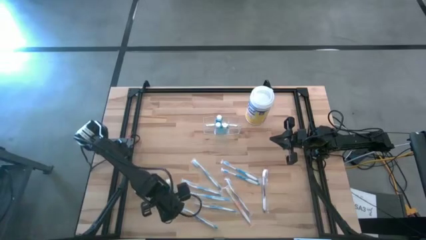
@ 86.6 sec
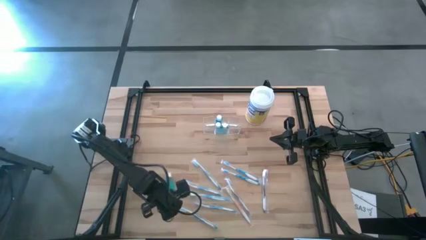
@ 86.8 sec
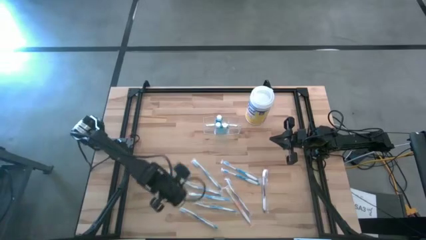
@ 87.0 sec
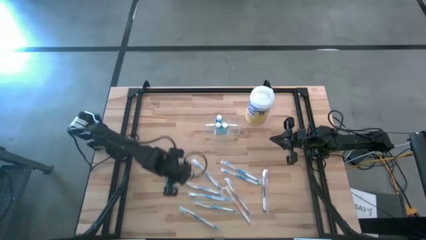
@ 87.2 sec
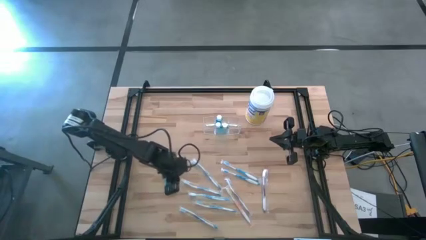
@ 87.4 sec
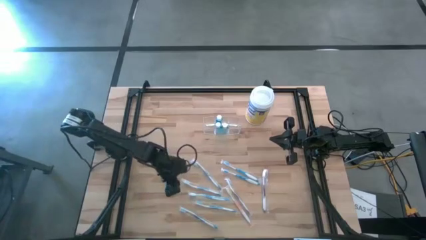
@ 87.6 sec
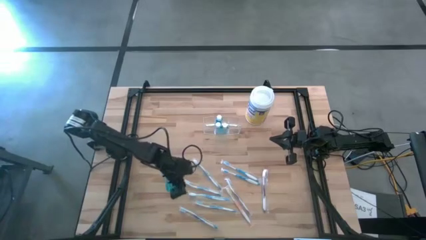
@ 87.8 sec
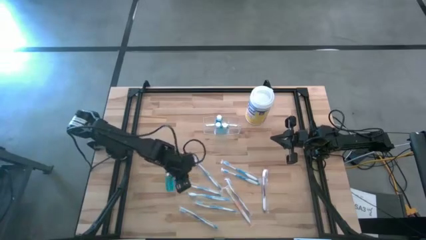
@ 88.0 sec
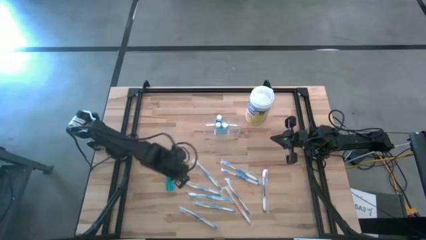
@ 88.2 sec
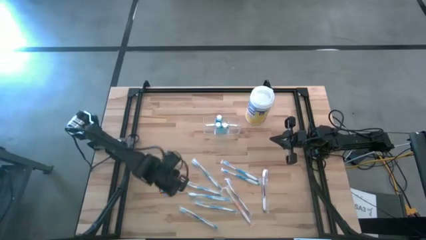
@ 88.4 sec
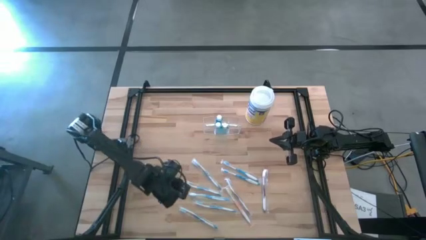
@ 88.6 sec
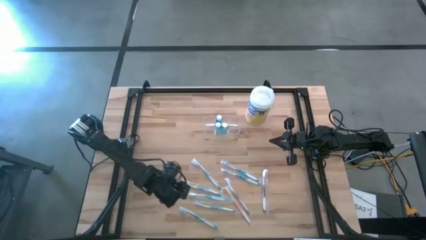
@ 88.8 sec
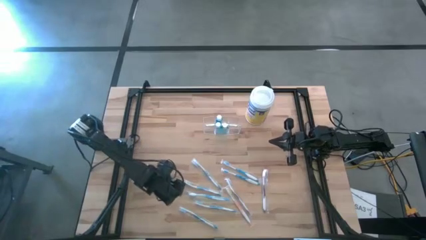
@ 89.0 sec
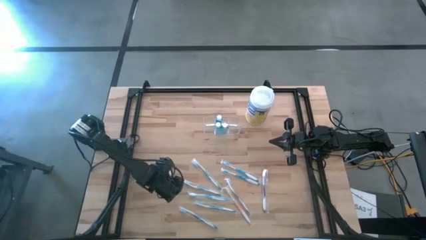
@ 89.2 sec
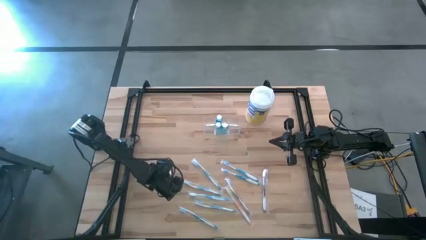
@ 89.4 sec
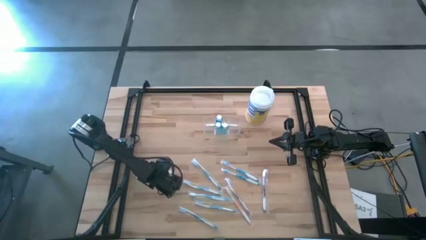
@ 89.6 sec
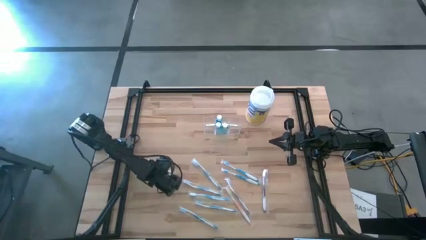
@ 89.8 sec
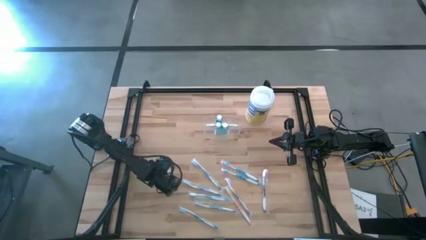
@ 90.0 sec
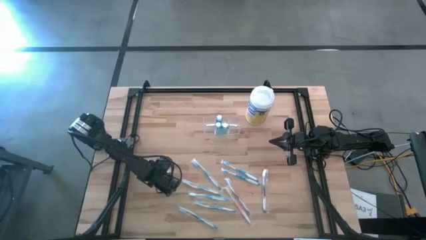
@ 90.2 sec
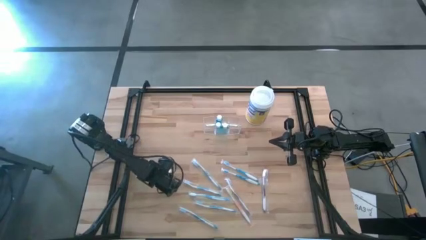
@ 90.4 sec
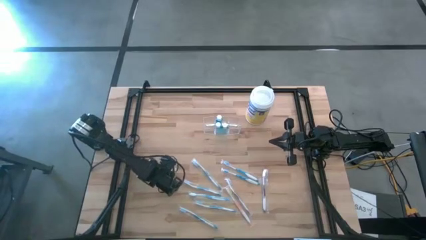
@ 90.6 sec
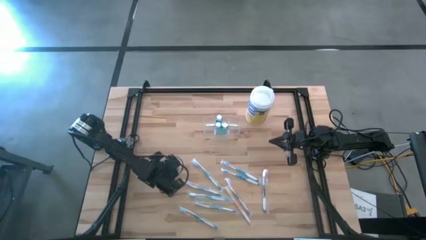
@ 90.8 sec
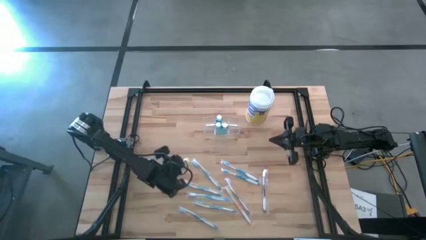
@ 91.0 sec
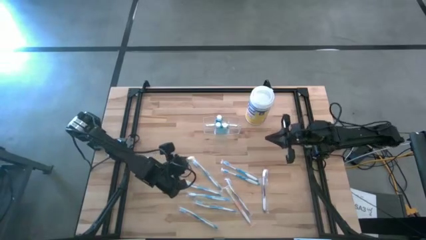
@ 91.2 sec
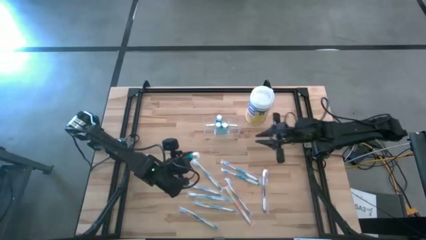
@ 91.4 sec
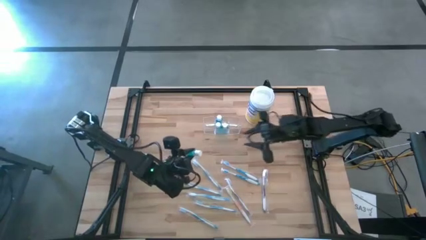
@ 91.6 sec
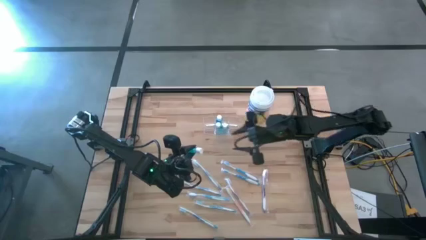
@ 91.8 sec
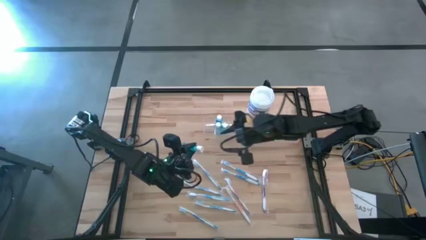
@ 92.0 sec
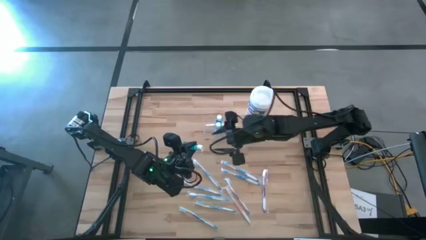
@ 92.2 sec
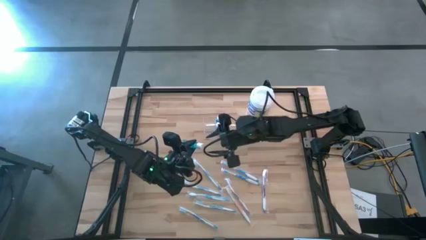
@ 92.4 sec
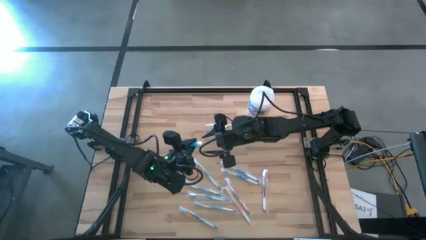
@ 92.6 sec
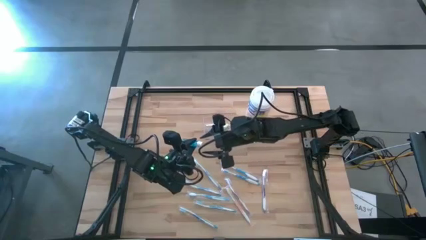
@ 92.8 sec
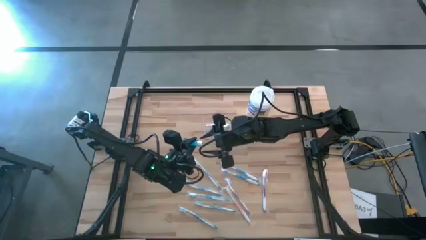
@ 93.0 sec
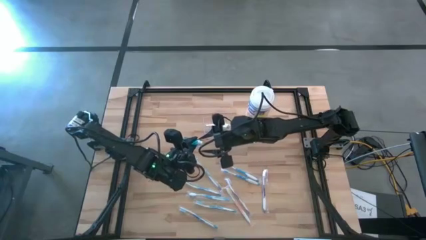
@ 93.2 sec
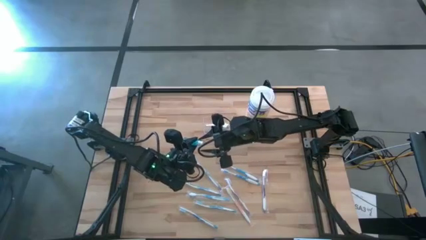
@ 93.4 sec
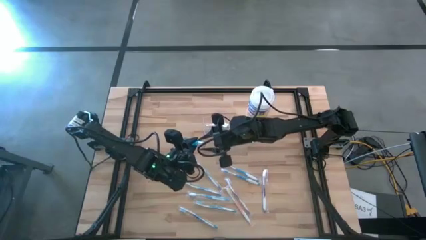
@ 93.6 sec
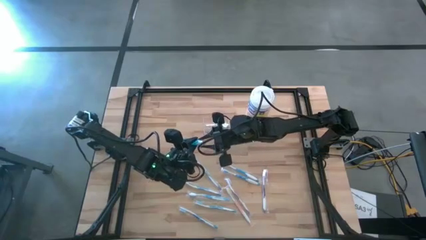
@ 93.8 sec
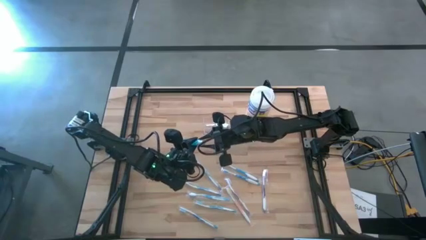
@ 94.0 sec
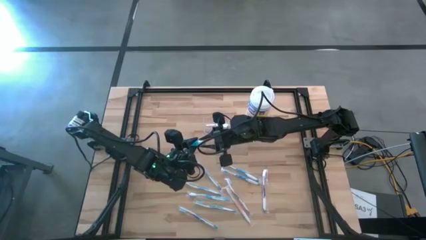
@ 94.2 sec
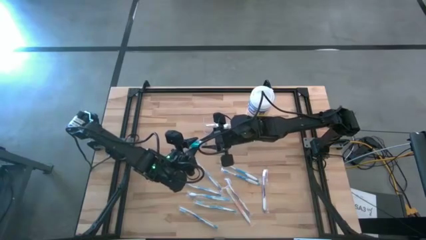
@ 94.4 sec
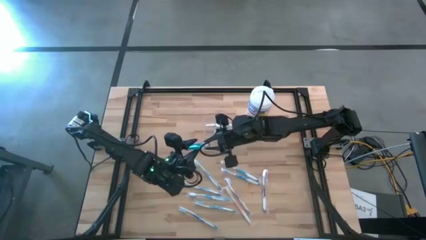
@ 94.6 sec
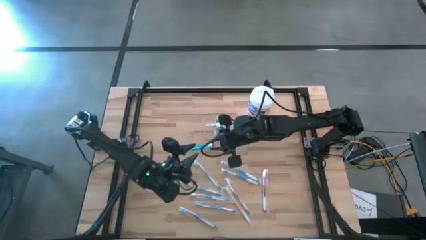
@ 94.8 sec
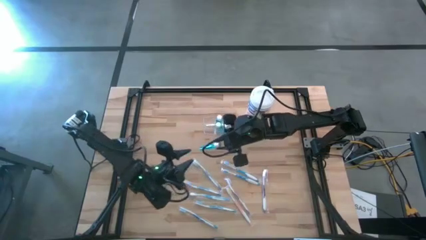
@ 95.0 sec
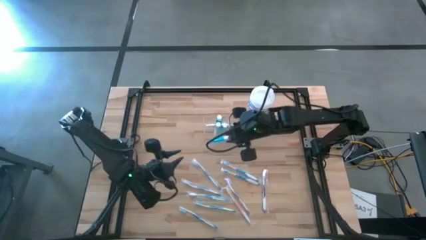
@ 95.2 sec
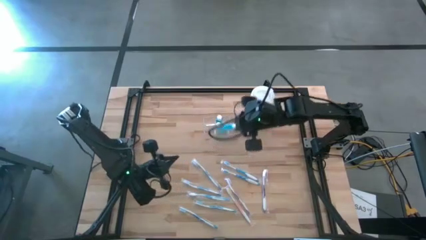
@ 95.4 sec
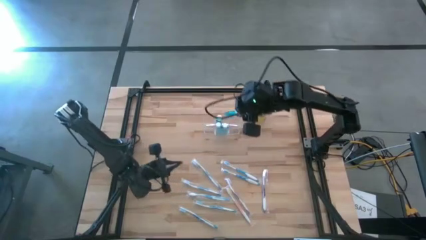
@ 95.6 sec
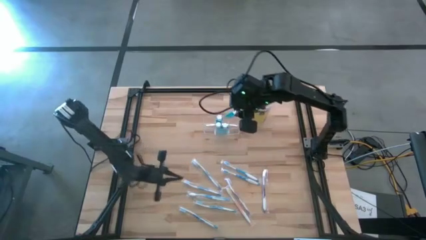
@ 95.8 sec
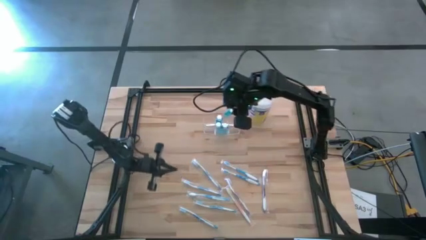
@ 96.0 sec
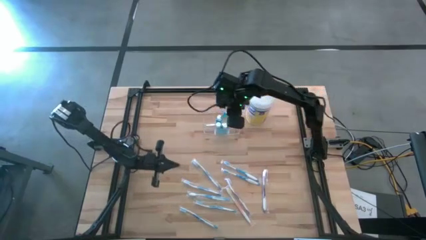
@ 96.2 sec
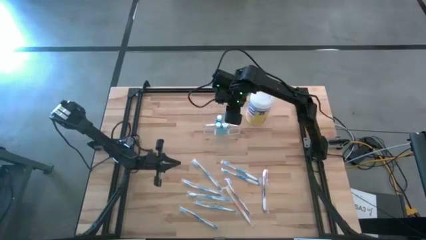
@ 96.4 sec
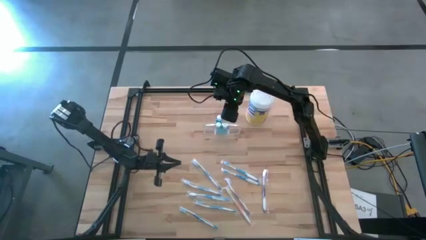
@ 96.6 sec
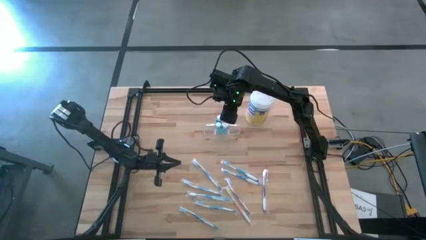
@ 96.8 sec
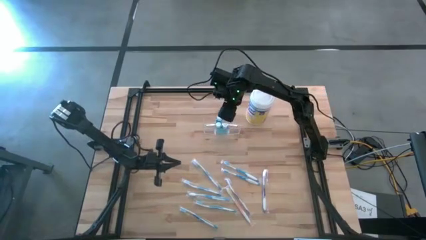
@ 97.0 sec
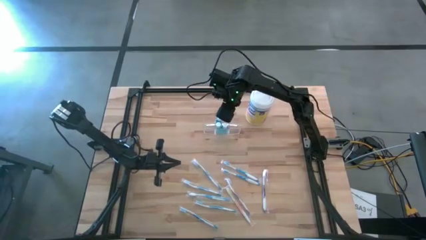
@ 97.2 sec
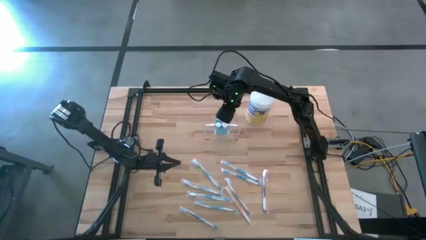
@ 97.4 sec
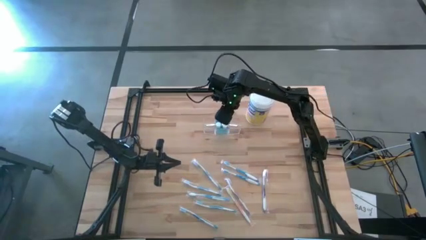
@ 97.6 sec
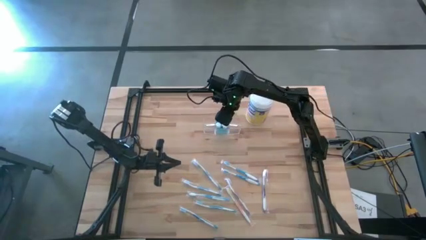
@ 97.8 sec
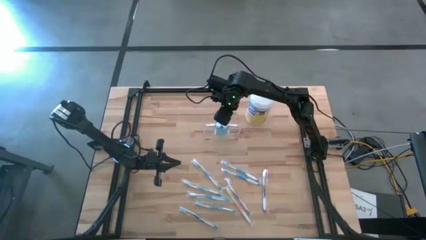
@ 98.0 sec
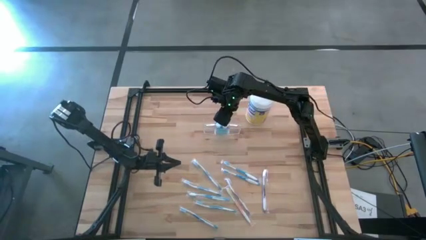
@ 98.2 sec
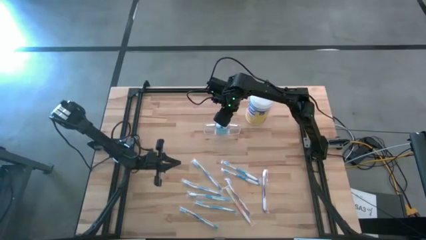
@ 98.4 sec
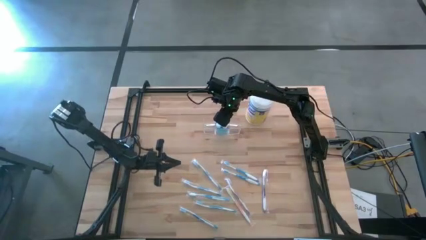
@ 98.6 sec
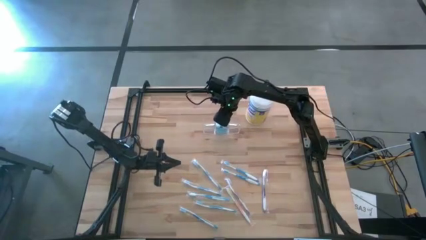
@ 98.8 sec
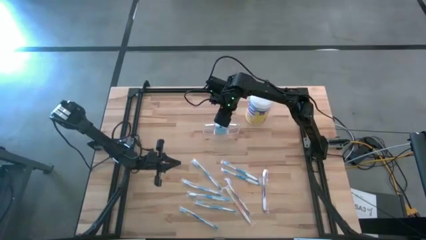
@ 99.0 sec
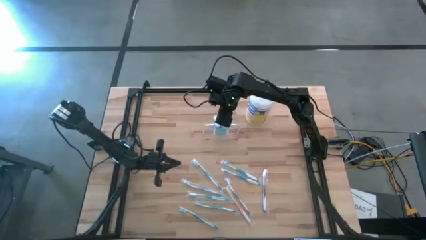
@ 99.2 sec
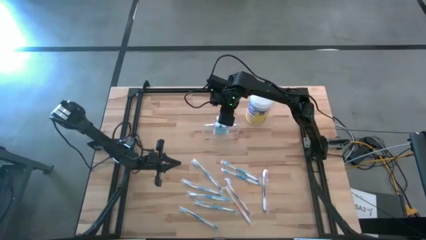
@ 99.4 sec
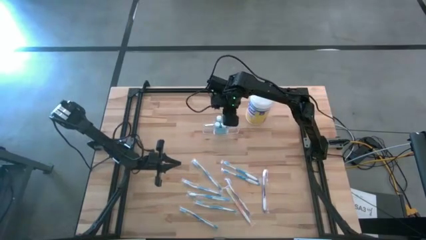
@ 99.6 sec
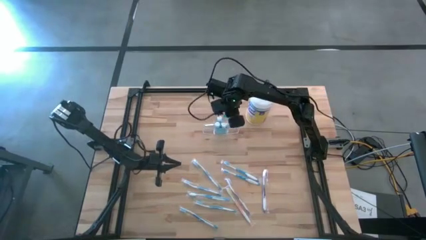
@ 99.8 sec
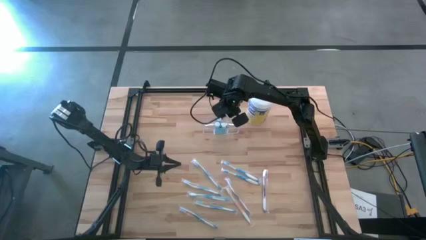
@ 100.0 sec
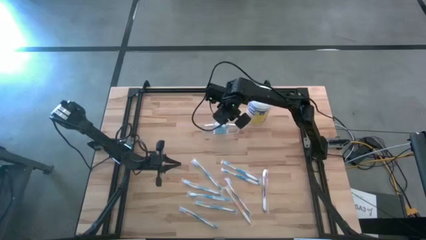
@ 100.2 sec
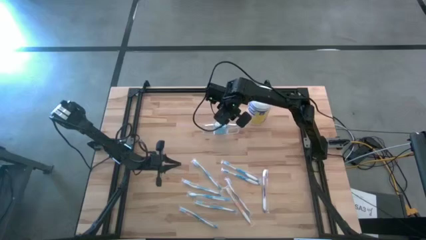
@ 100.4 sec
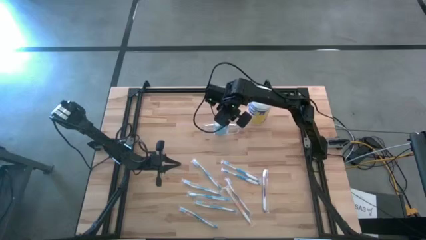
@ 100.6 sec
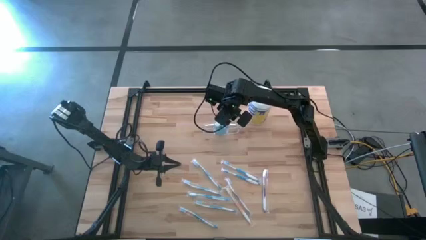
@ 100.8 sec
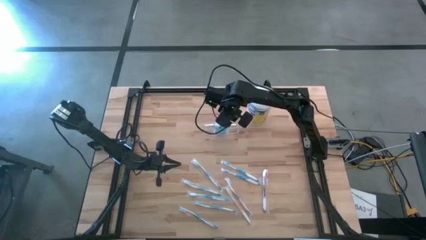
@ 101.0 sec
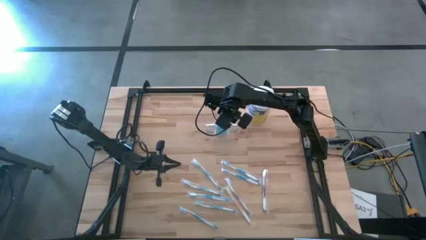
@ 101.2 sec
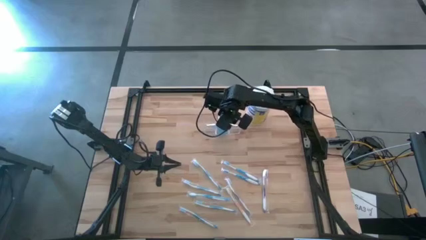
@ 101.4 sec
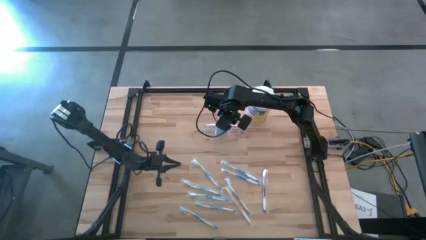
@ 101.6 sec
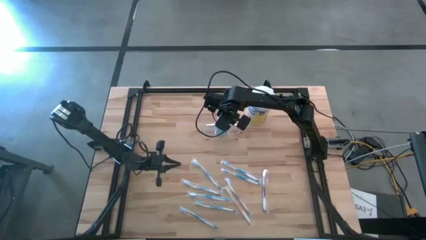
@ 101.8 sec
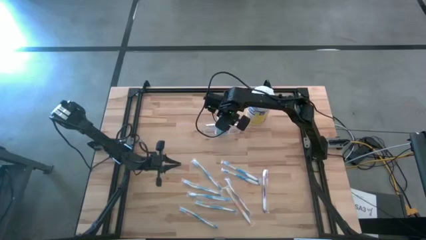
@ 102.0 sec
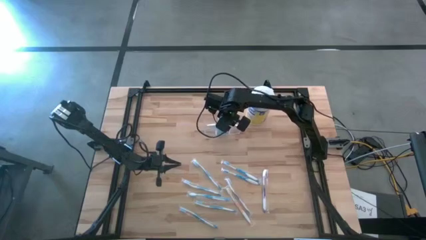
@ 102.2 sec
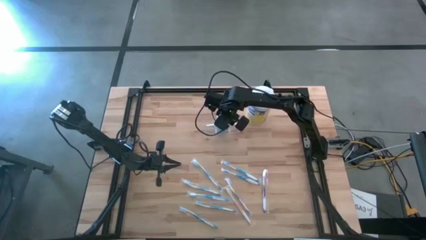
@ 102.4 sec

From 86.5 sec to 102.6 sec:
Task: Pick & Place toothbrushing station
Put the blue mouthwash into the transparent organizer
